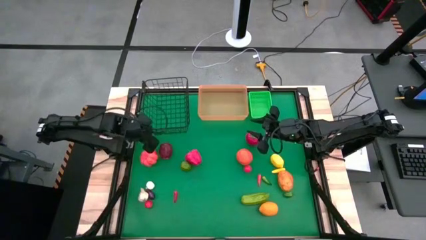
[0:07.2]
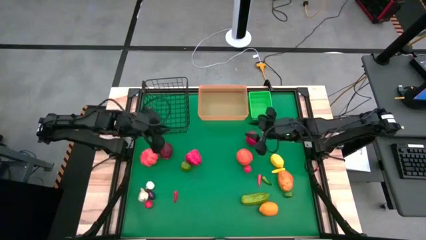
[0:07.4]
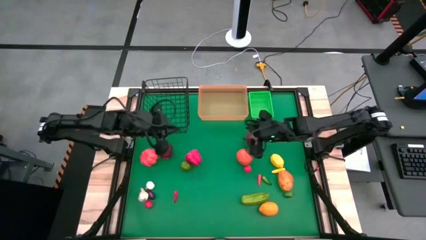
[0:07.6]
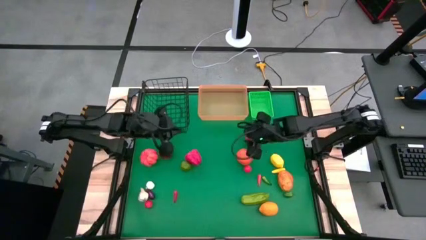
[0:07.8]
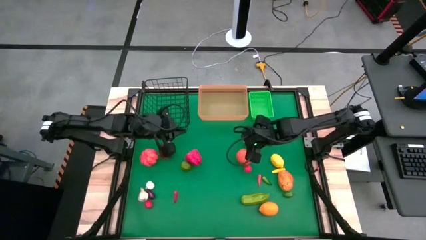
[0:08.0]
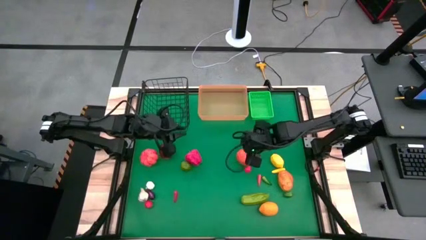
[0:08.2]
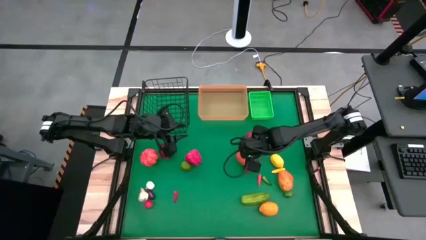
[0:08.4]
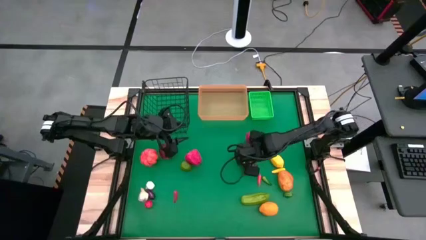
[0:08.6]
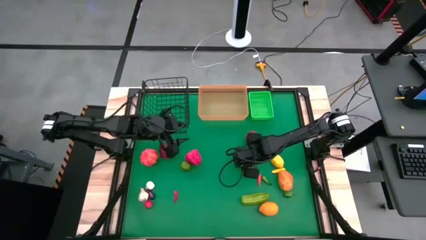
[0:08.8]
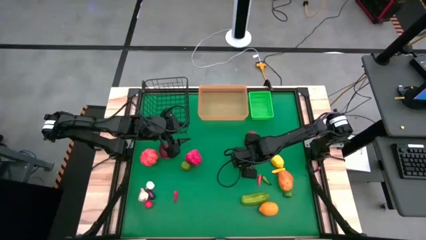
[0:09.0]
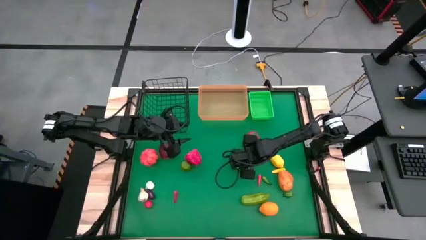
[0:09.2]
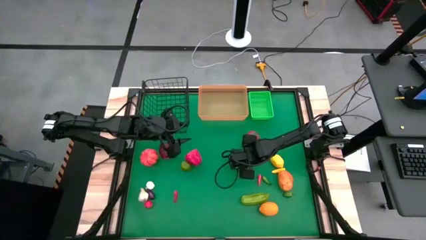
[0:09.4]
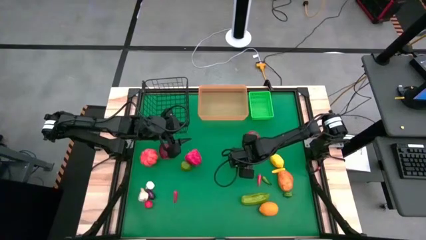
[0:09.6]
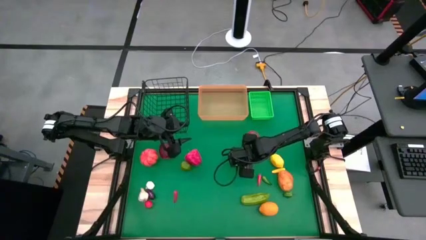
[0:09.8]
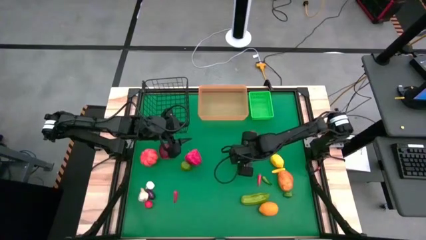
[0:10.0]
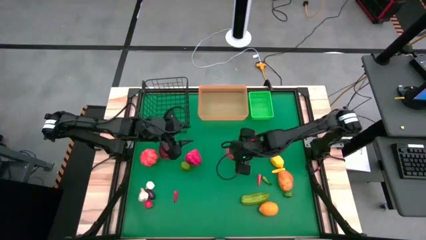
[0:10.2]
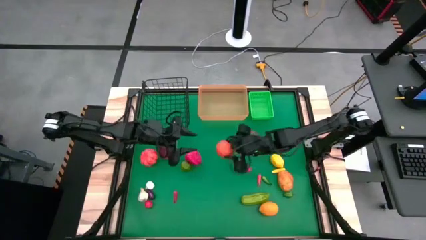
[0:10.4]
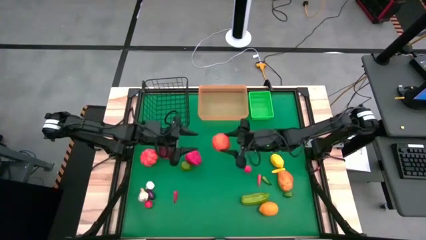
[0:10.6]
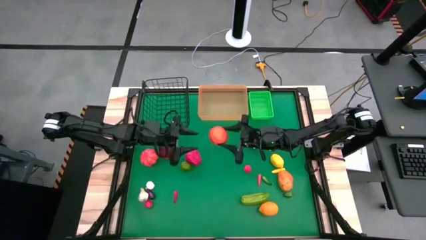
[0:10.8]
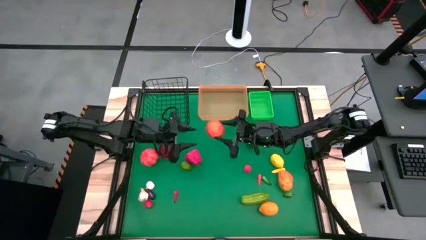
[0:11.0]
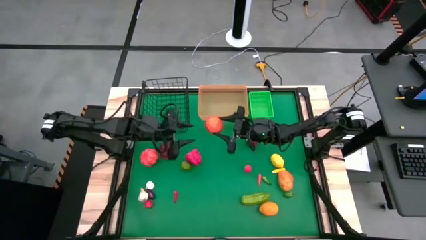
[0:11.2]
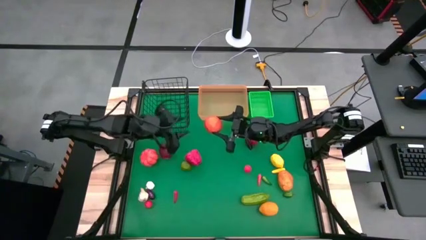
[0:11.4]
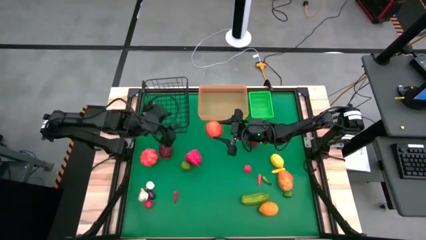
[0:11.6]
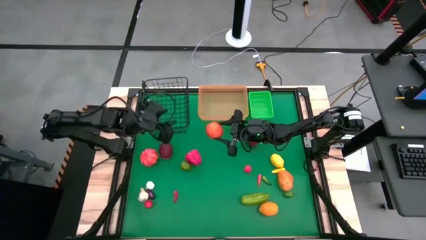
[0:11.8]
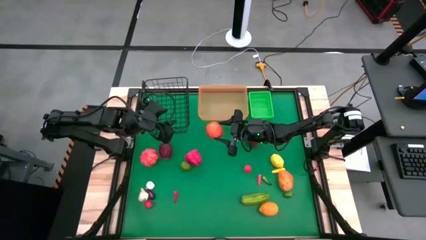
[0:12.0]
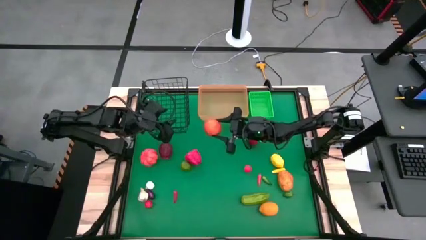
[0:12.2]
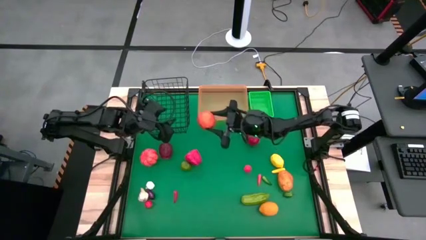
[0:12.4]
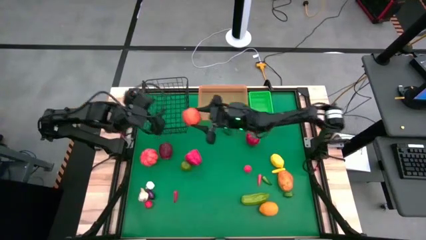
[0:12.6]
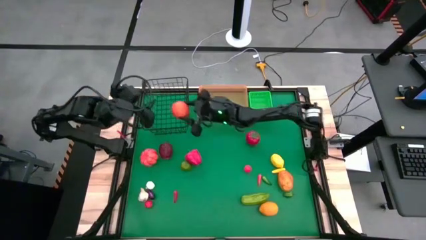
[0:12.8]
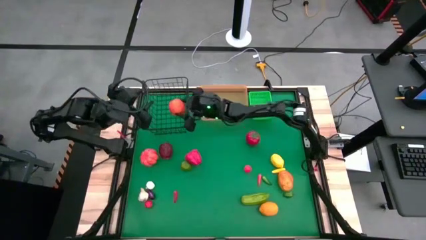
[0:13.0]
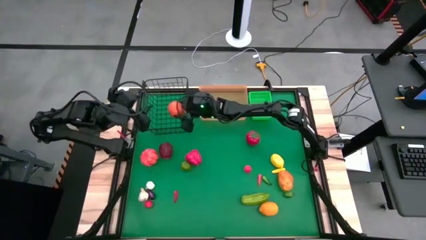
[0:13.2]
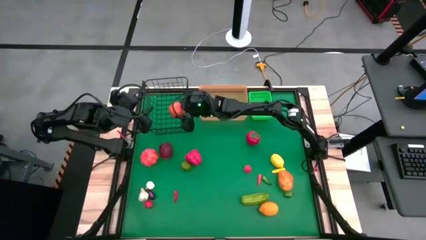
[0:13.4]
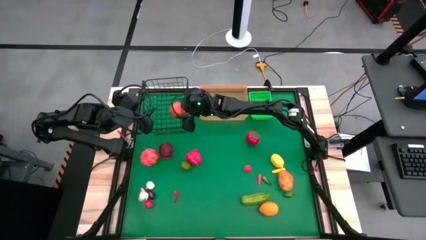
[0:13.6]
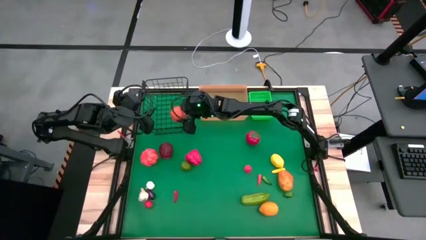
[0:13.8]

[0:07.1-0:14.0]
Task: Sort produce into baskets
Put the orange into the wire basket

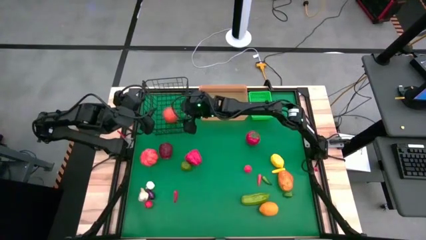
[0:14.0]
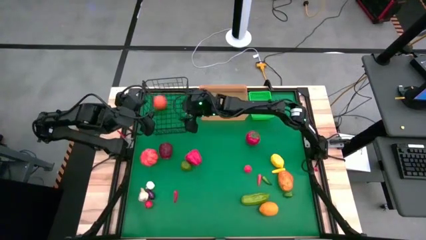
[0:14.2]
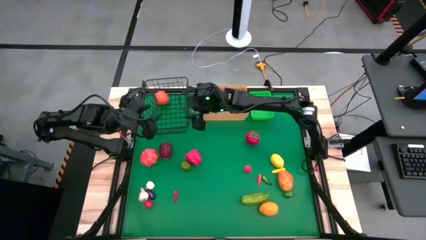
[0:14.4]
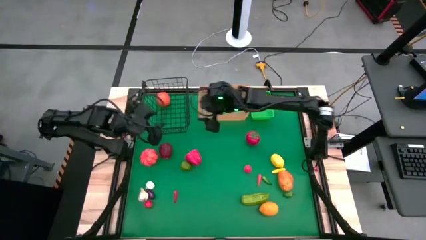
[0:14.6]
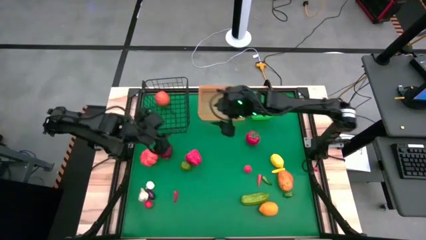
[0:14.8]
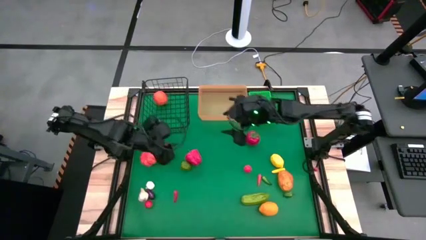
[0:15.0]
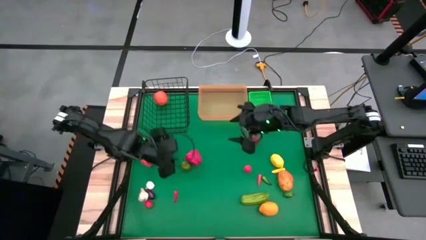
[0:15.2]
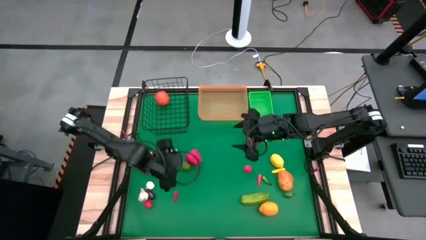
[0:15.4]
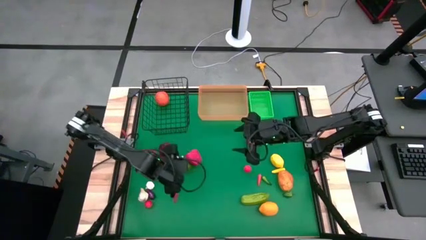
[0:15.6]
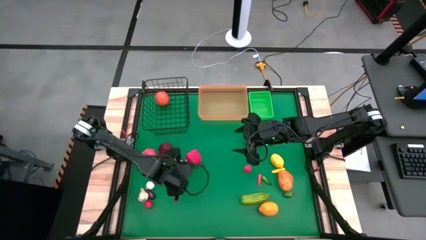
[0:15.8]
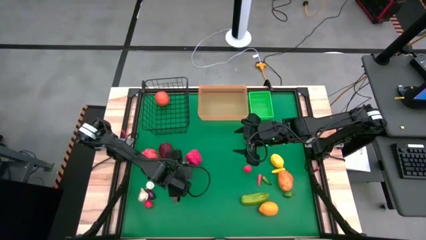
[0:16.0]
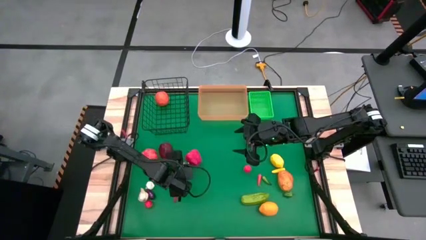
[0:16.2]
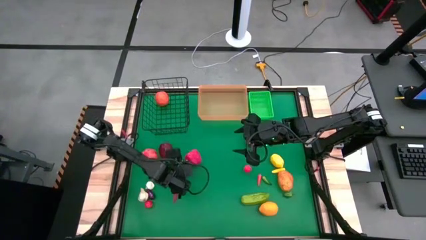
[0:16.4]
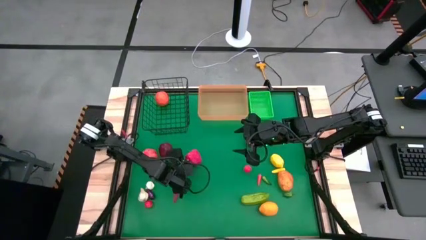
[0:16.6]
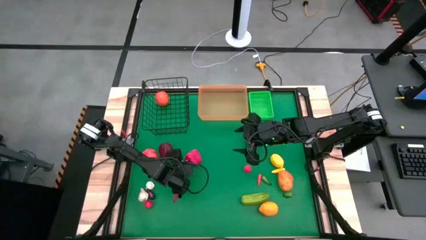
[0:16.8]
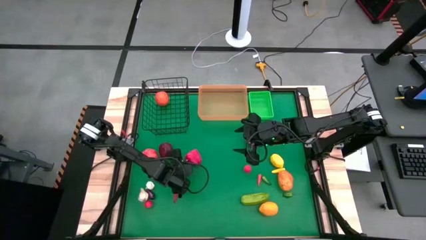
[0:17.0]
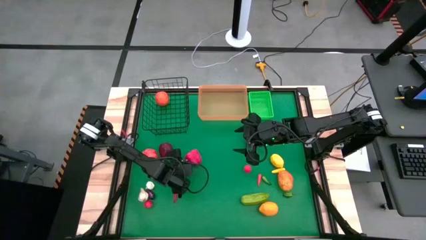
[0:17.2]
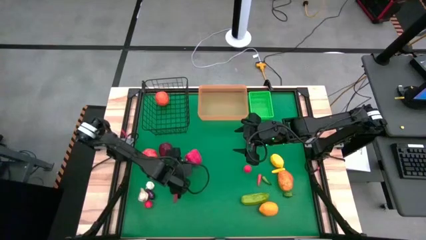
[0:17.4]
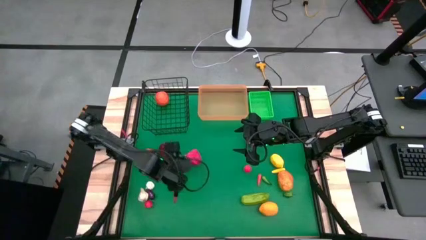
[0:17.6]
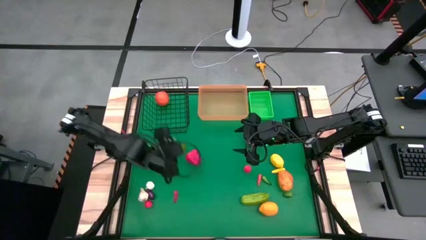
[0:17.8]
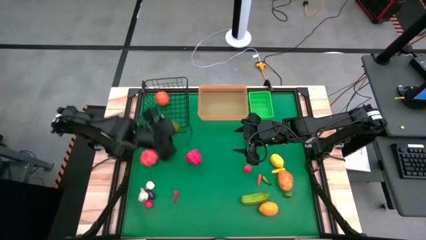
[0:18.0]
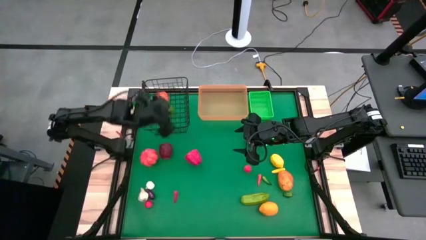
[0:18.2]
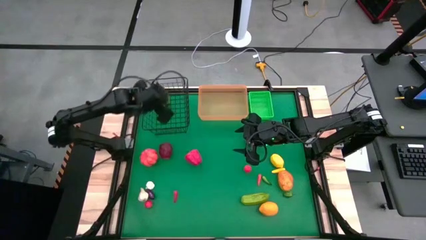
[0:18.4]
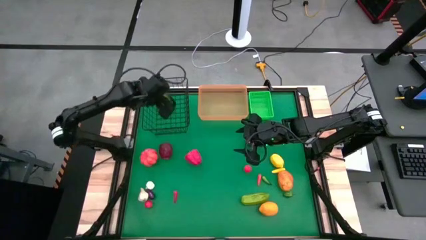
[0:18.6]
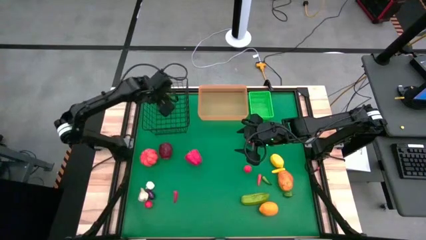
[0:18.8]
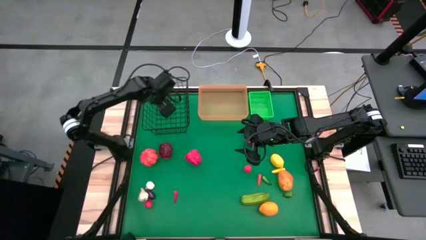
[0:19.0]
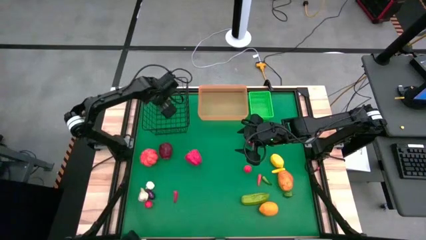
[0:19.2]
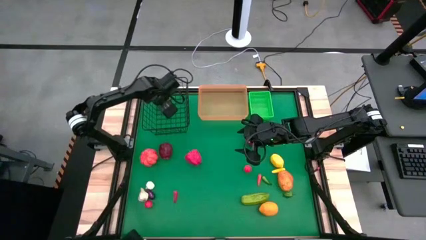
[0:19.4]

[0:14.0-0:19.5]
Put the green lime into the black wire basket

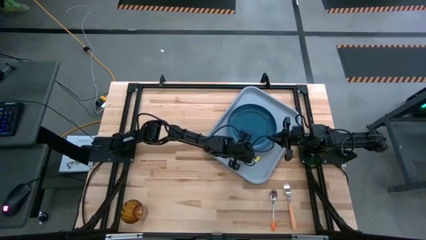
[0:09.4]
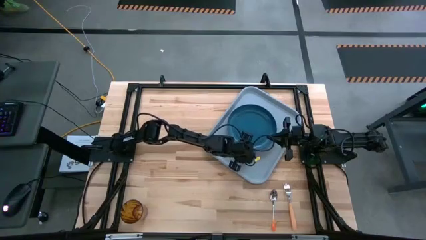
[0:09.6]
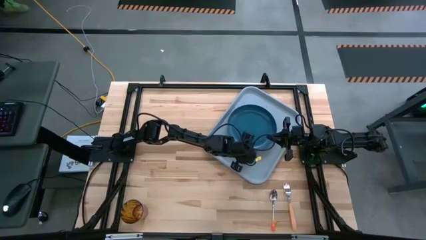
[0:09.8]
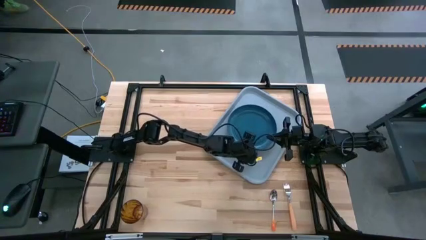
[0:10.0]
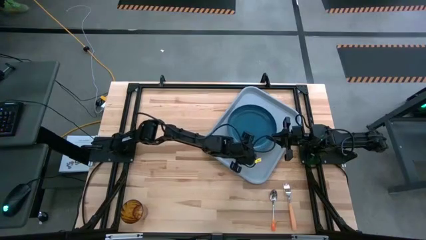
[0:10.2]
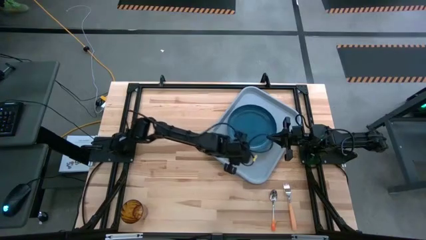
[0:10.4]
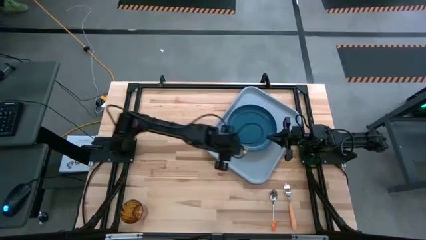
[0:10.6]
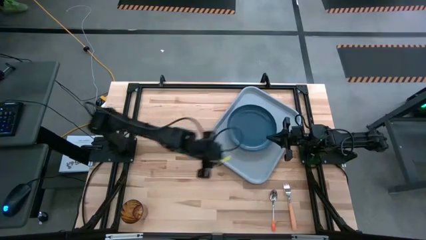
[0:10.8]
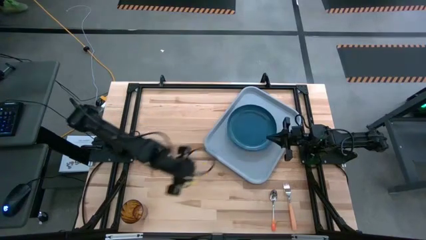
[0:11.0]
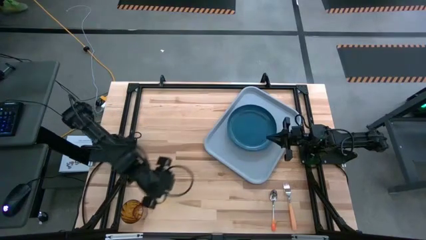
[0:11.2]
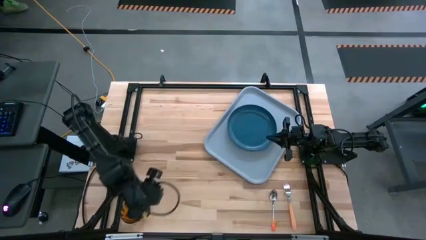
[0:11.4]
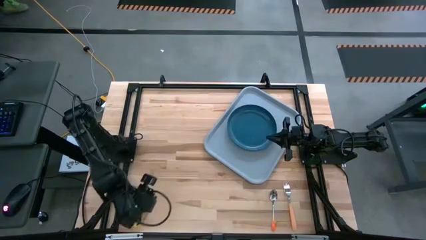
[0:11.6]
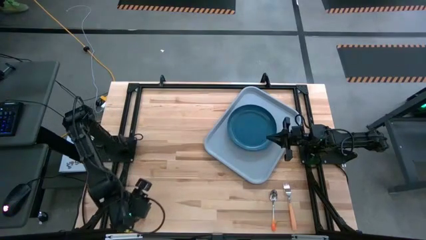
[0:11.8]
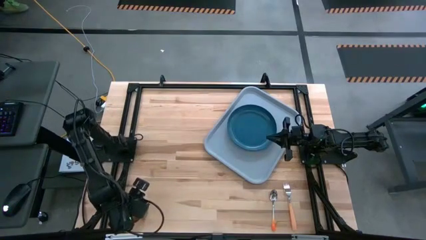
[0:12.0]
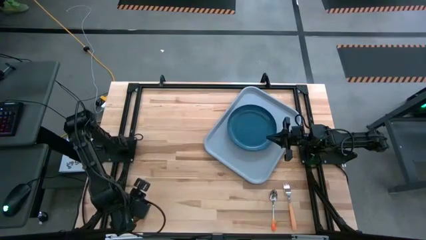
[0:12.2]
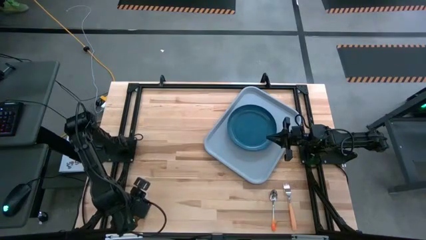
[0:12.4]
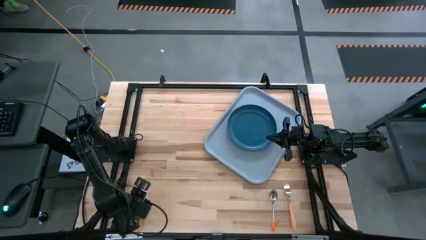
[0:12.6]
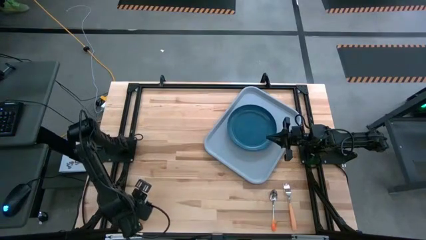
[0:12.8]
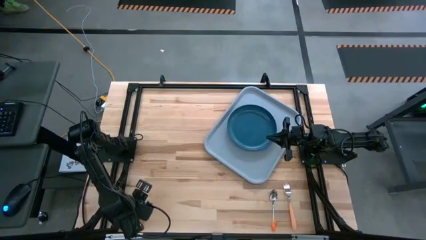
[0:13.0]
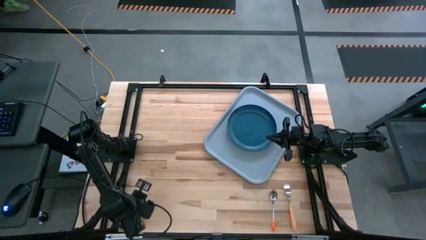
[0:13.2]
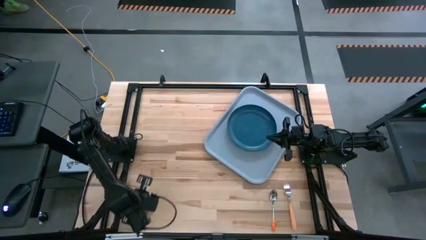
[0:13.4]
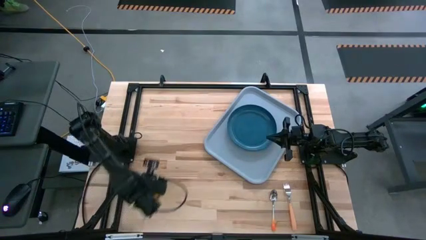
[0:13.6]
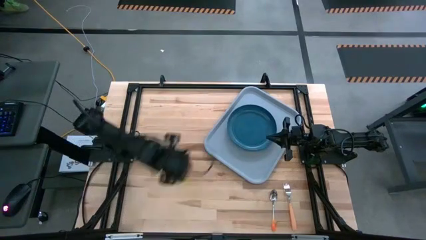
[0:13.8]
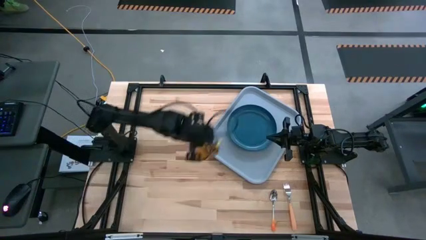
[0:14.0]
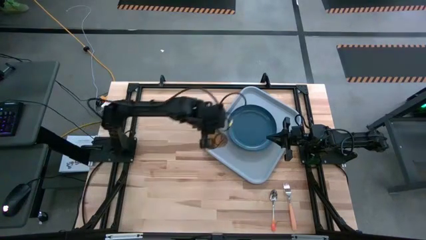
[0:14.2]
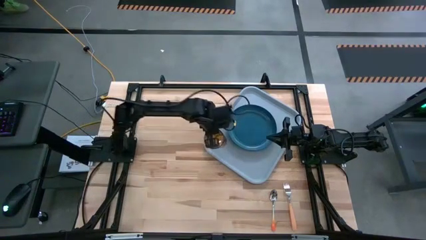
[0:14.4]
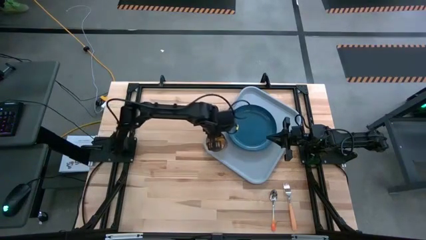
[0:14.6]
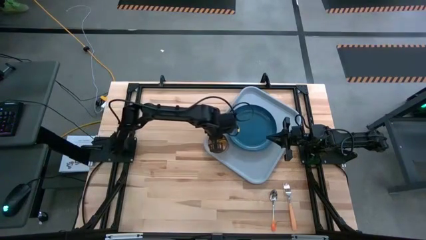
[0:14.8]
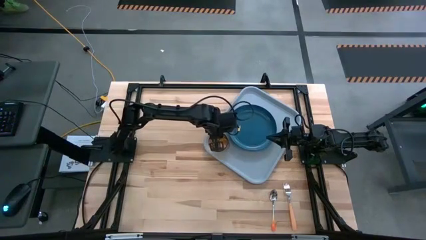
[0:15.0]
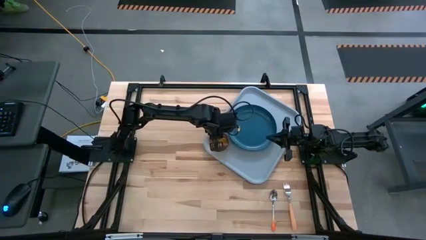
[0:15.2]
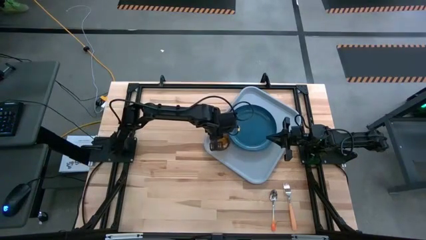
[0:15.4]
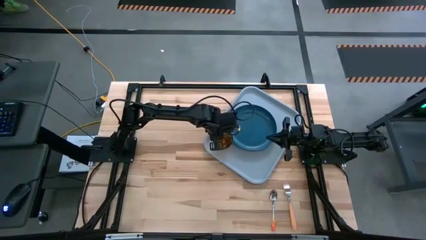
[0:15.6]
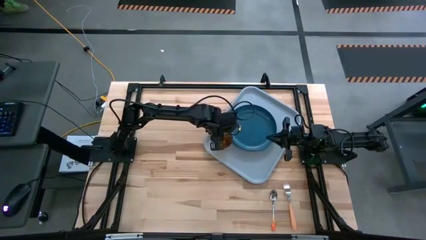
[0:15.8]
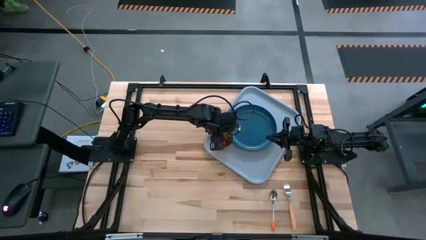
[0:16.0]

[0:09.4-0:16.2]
Task: Pick and place plate/cup/fork/spoon on tray
Put the orange glass on the blue tray on the left of the blue plate
